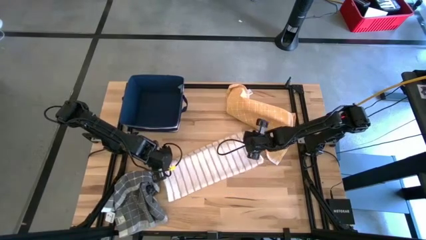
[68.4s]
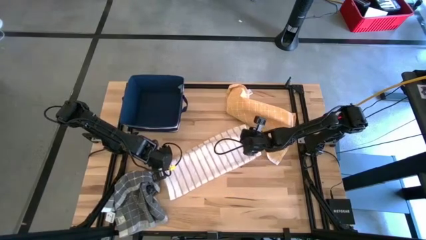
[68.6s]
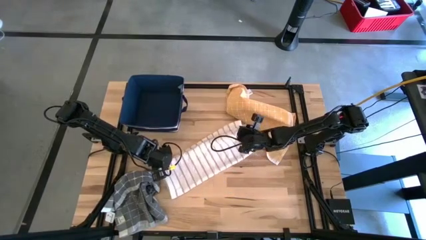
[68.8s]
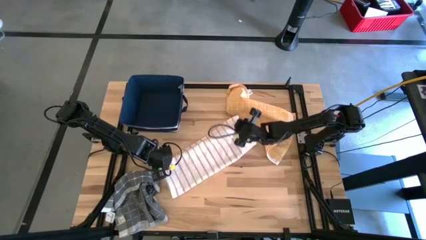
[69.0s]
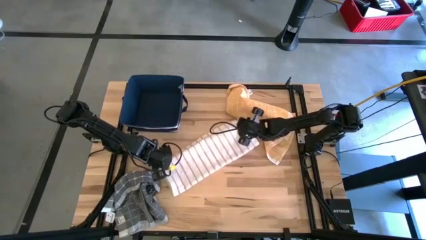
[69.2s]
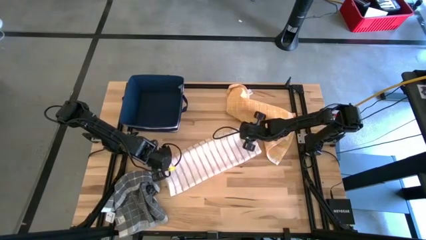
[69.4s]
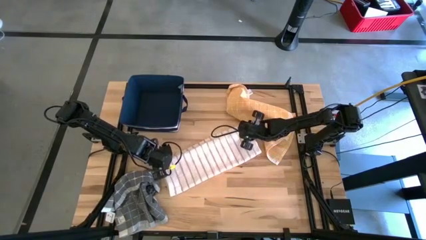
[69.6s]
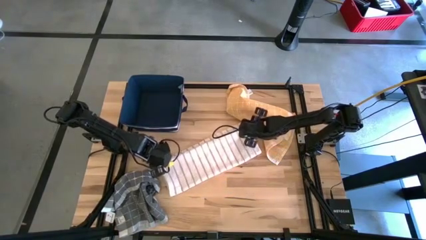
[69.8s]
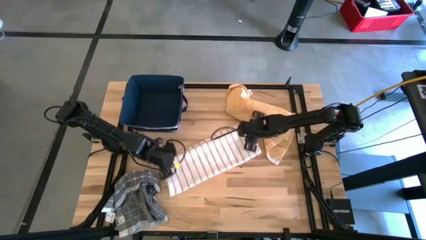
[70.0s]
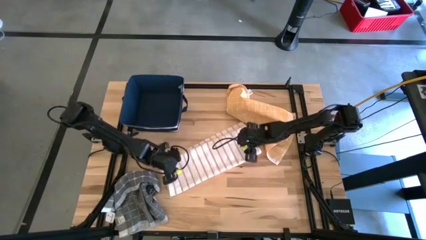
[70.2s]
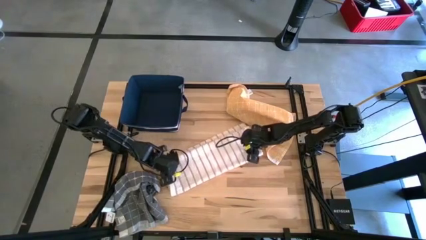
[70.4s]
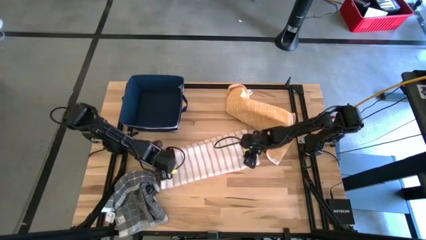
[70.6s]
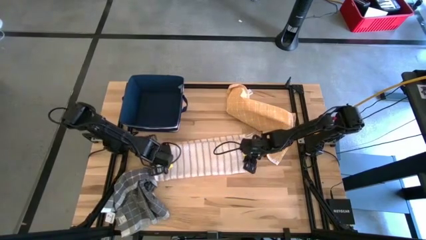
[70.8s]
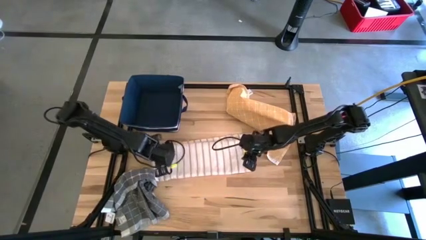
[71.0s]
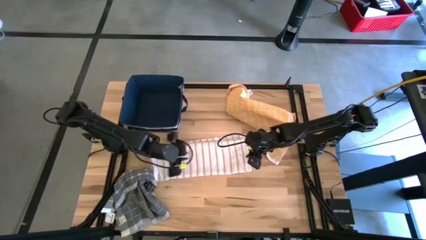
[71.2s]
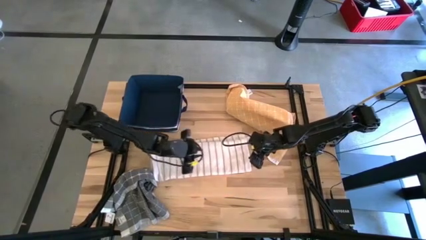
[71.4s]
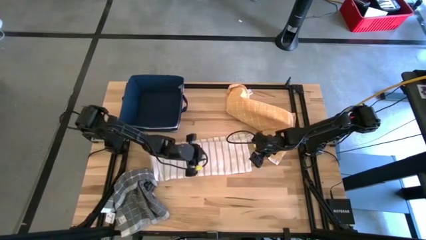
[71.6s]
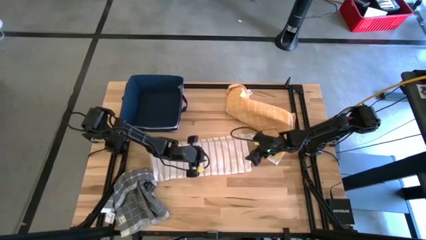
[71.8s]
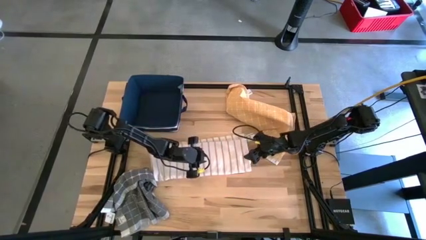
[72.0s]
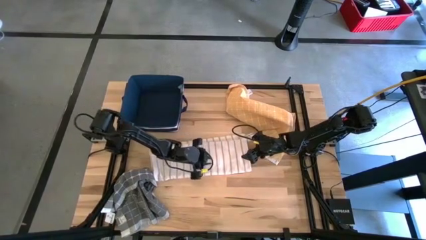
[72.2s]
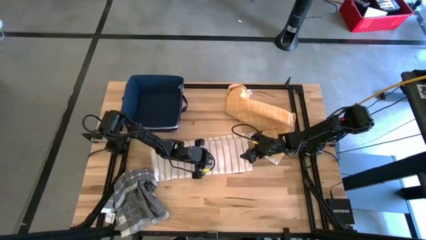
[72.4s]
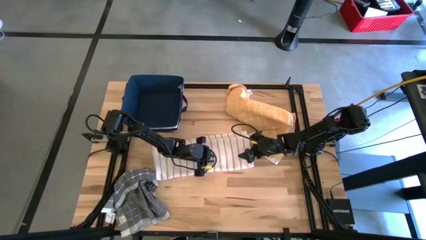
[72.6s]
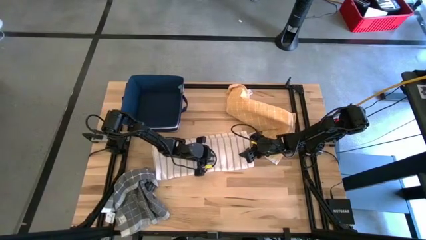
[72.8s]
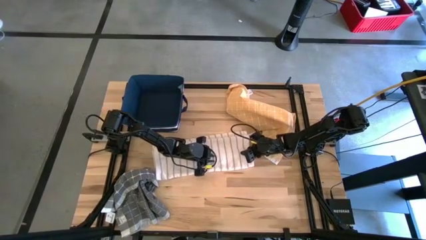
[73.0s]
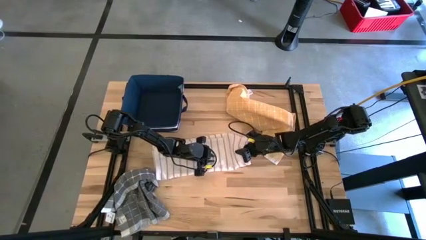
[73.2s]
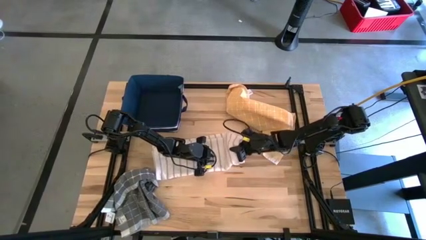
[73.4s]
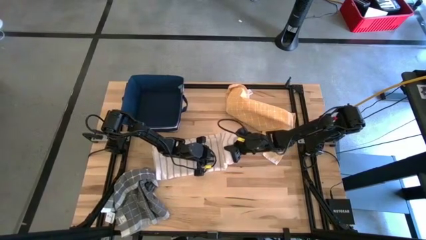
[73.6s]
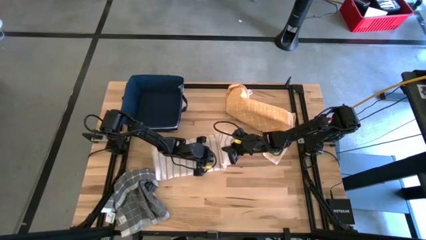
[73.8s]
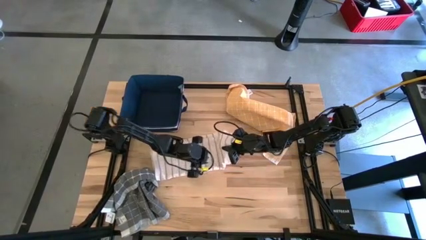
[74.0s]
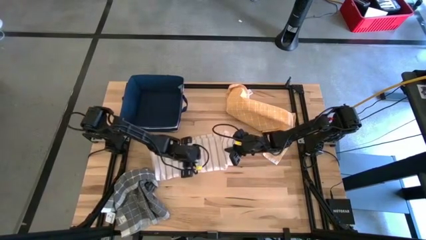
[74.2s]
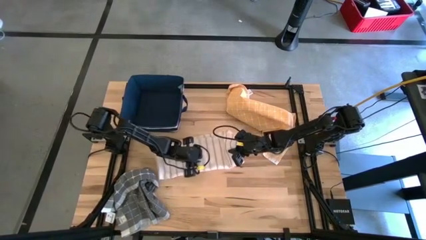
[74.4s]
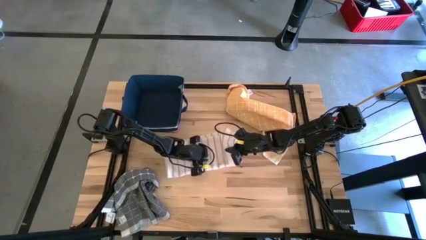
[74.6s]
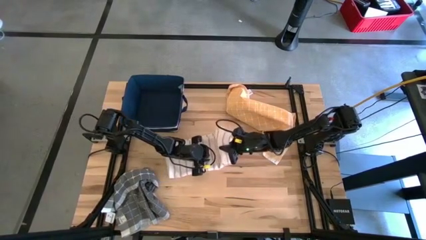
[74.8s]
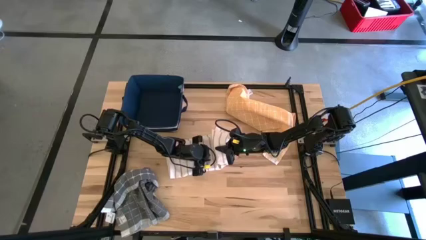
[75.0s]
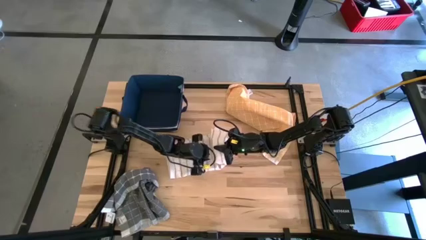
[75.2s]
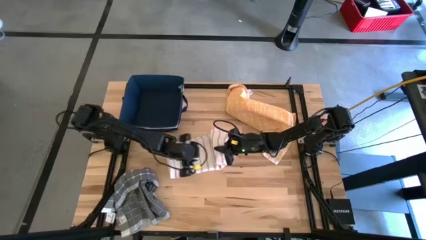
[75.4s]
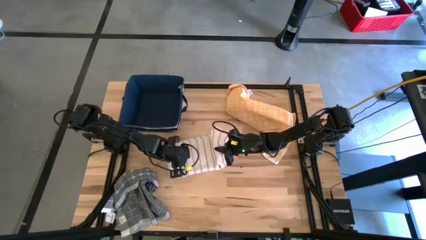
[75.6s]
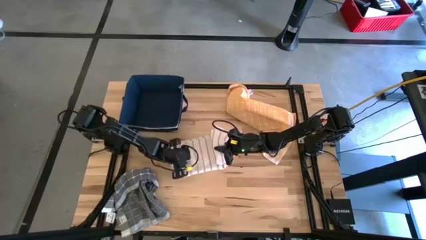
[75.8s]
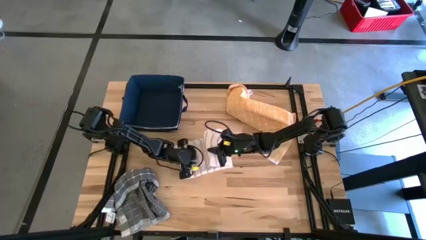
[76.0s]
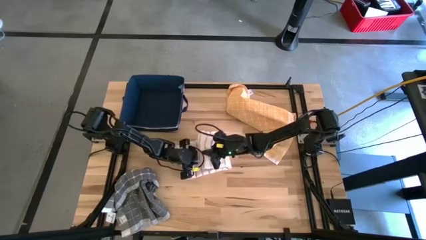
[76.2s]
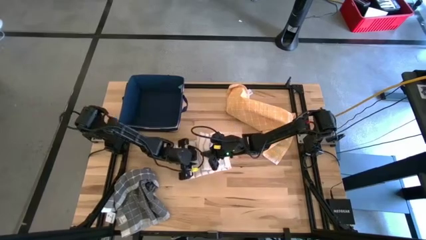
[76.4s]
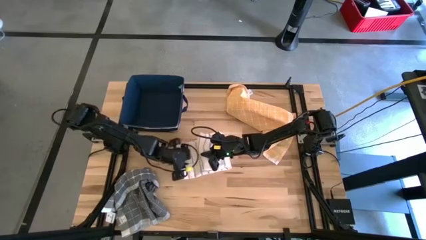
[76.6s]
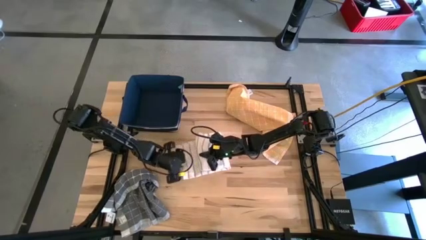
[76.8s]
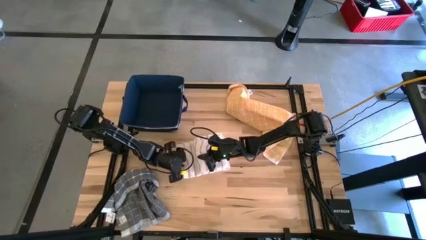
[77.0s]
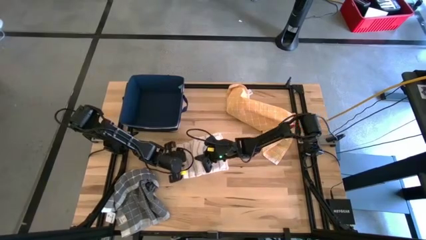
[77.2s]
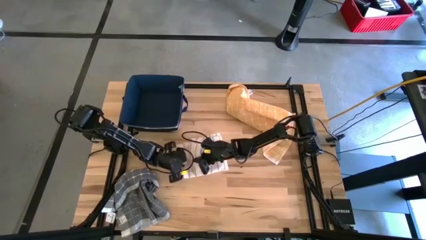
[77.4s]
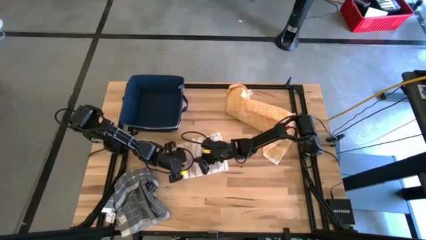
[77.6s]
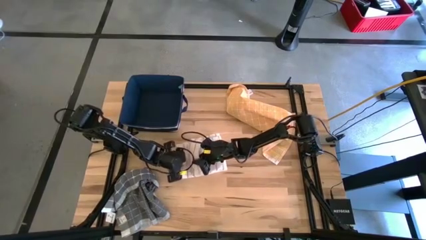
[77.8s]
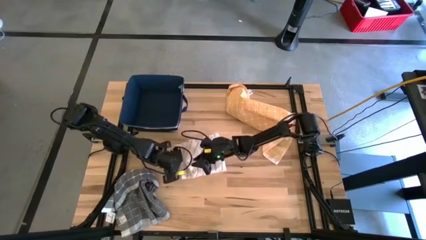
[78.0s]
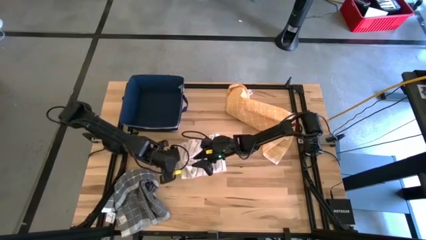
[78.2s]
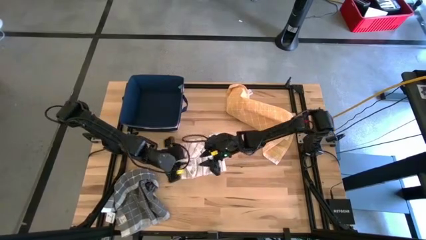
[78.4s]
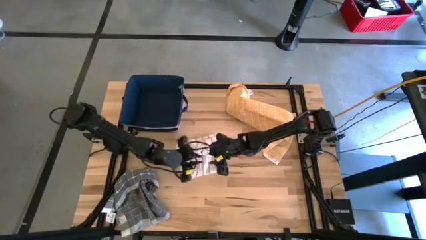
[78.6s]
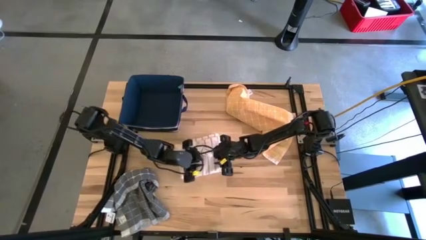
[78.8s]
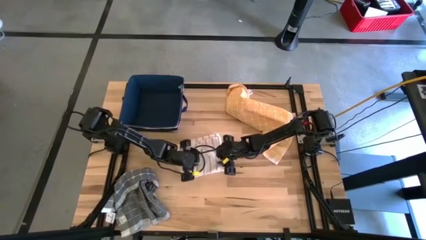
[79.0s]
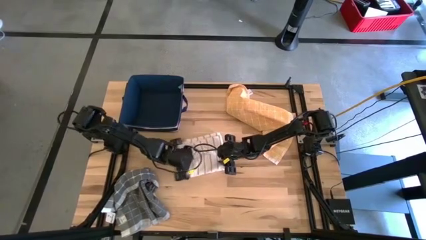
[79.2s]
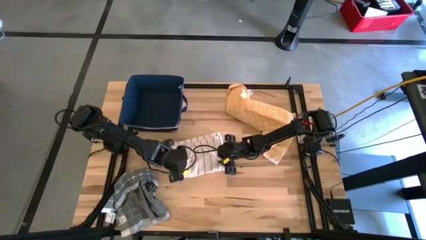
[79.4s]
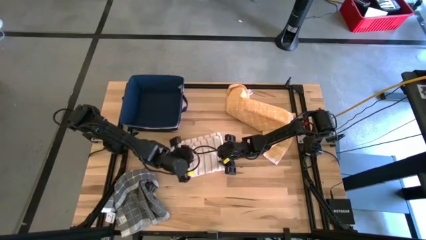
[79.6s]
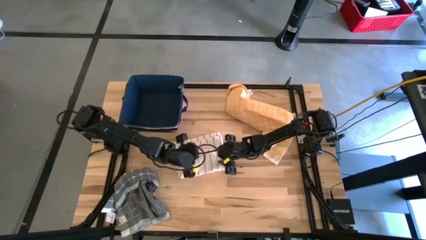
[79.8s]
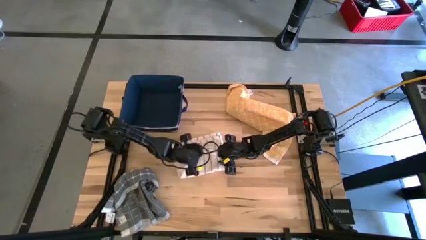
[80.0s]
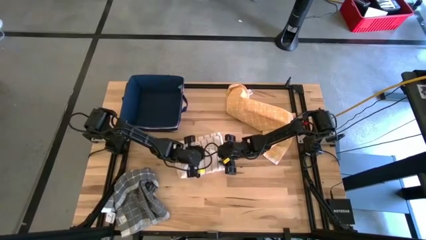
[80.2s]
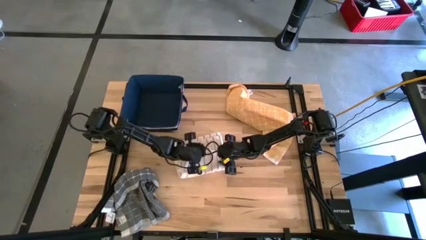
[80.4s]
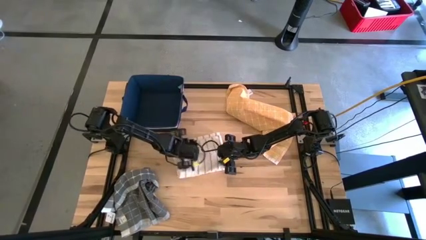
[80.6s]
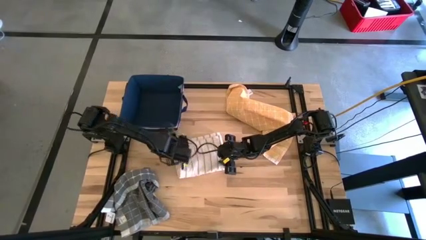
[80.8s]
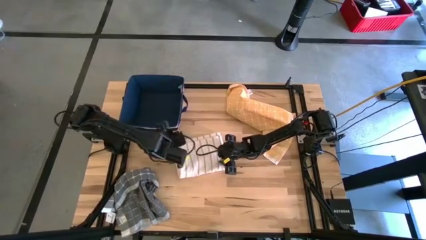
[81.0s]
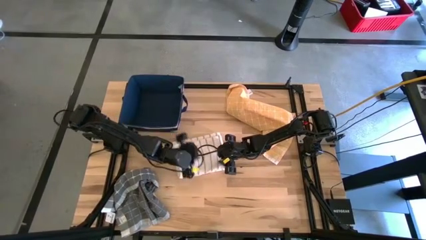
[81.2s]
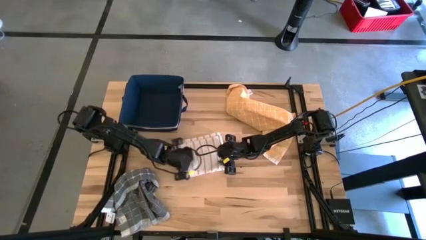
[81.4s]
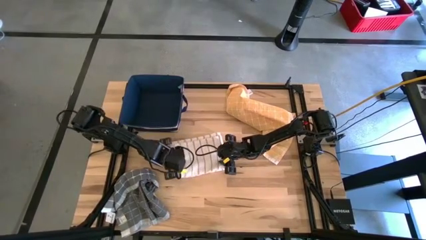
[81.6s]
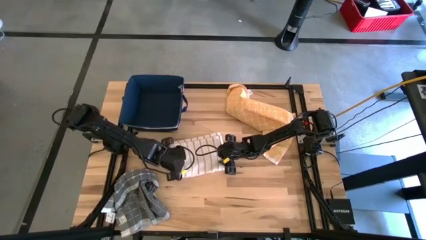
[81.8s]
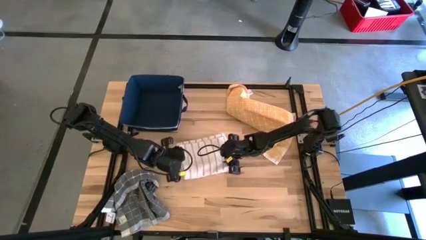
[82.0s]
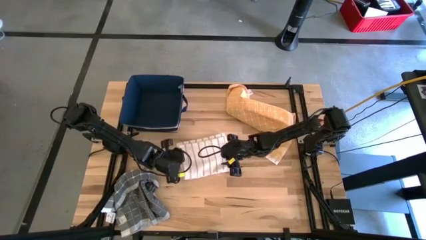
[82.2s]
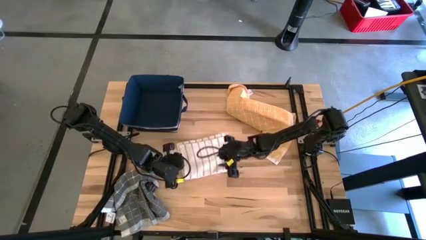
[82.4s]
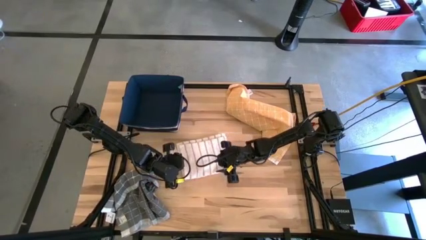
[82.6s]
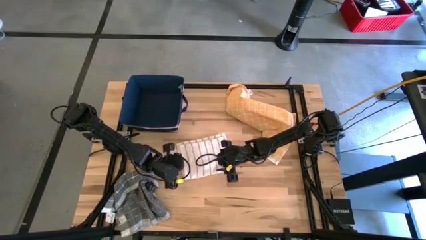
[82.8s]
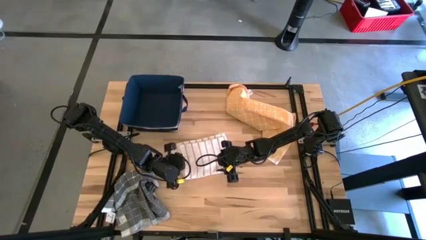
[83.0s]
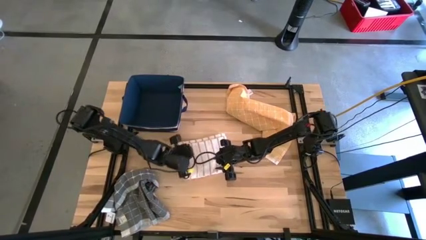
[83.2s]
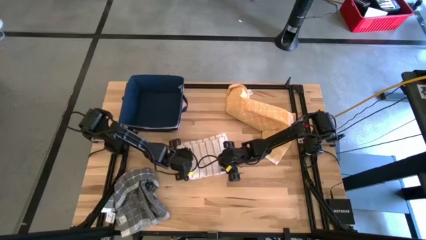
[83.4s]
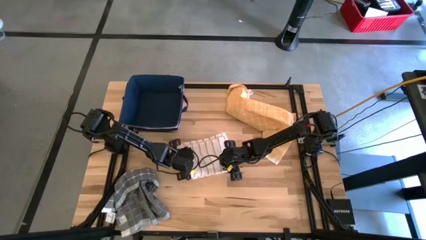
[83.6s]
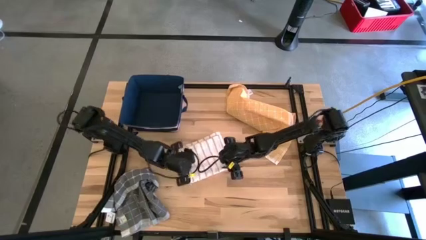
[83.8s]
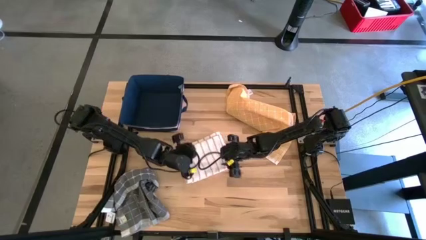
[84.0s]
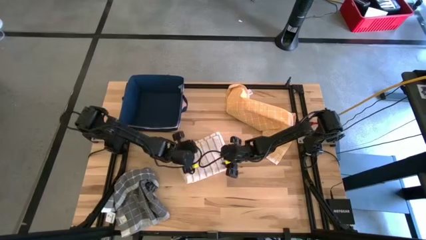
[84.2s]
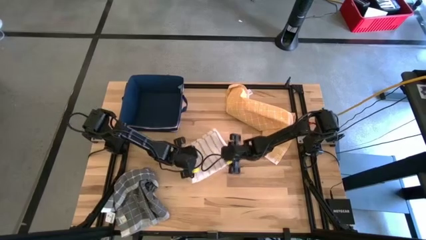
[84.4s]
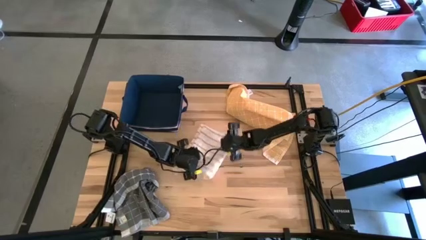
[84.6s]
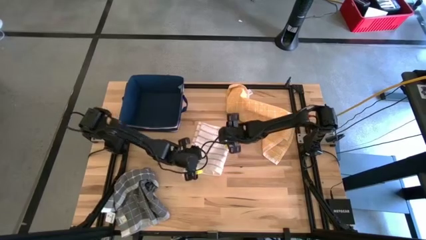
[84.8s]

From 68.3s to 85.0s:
Task: Fold towel
Fold the white towel
